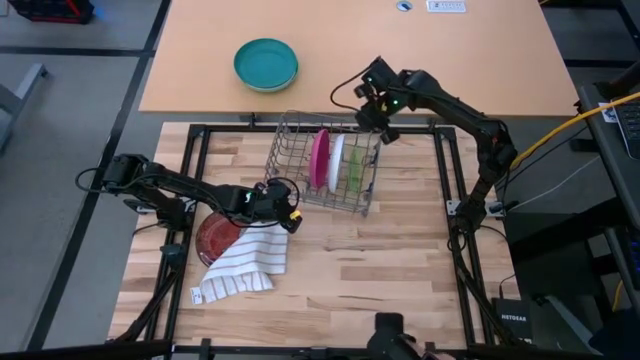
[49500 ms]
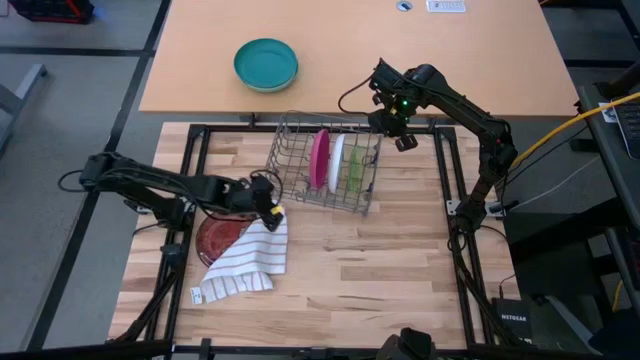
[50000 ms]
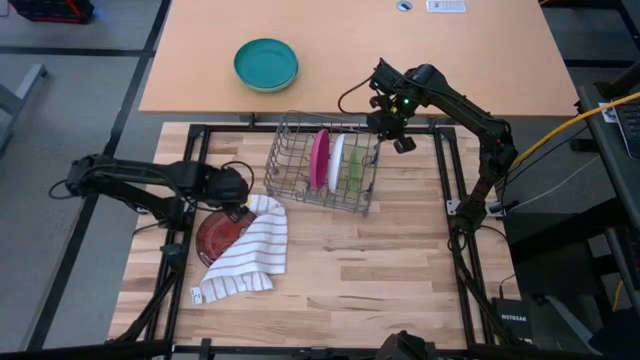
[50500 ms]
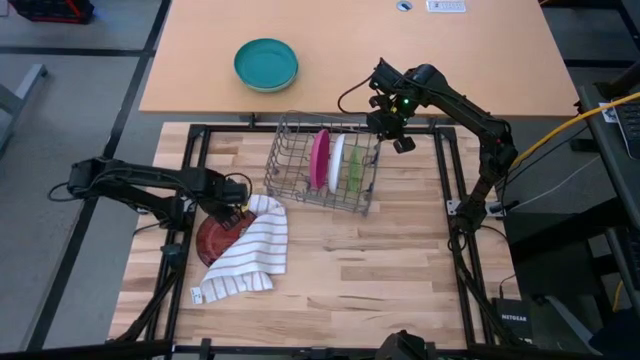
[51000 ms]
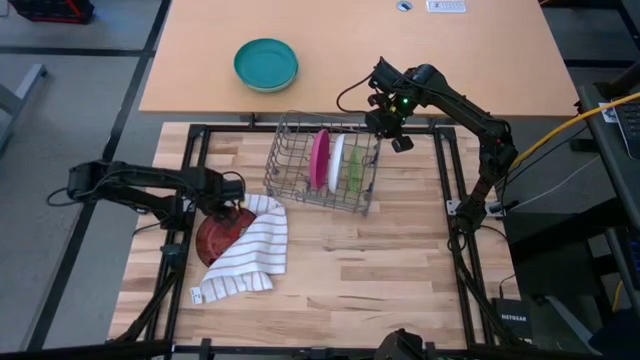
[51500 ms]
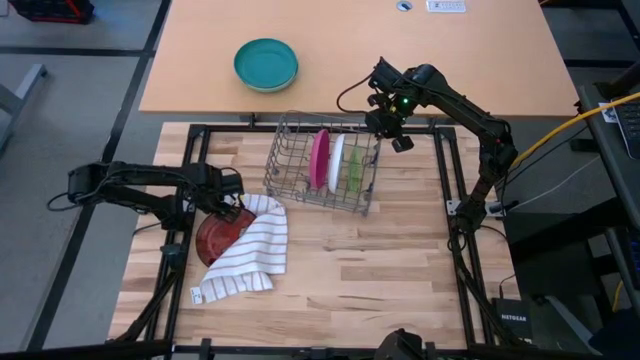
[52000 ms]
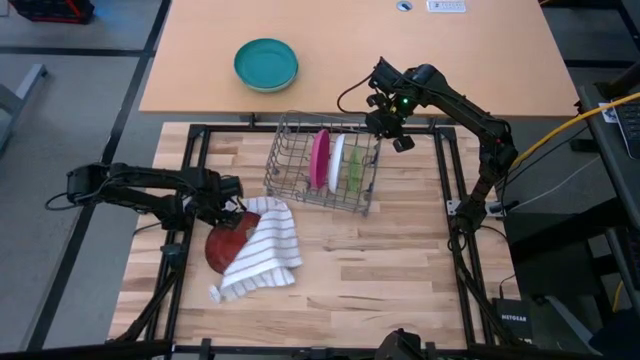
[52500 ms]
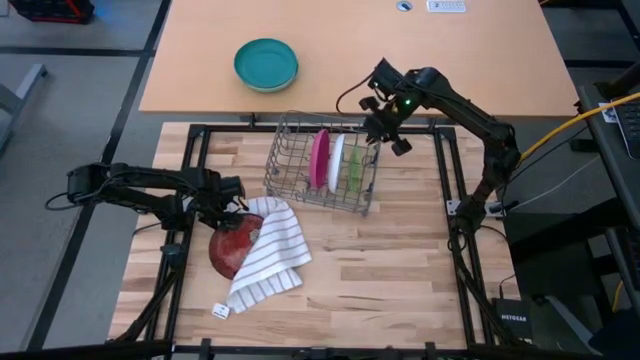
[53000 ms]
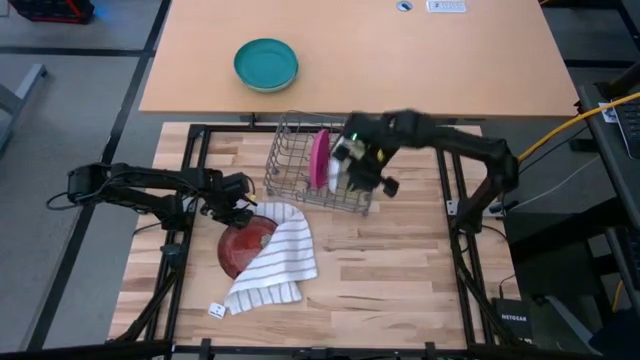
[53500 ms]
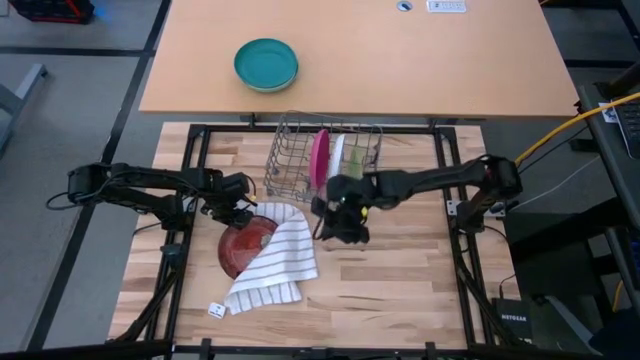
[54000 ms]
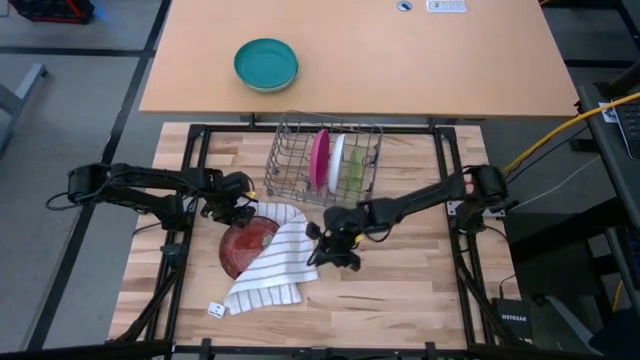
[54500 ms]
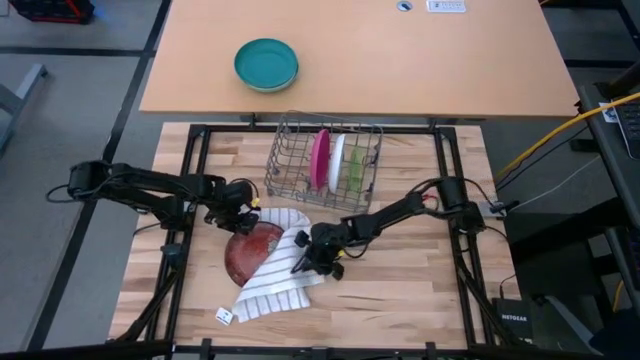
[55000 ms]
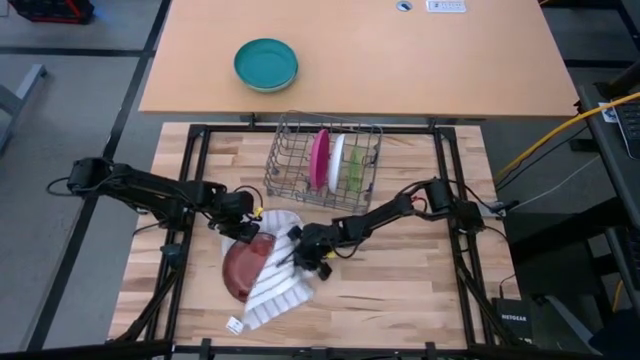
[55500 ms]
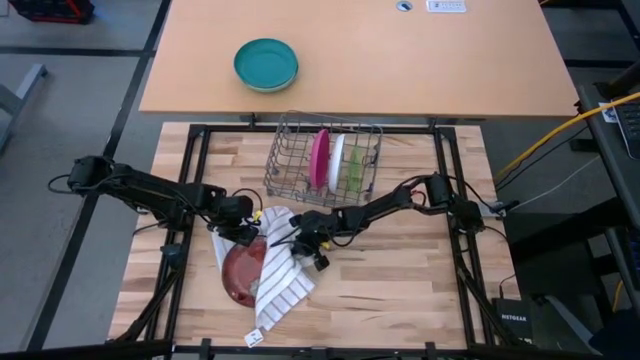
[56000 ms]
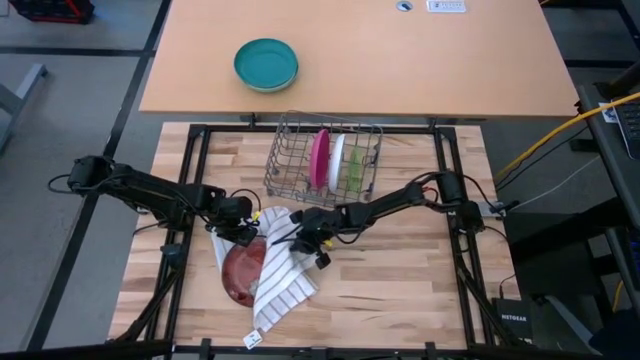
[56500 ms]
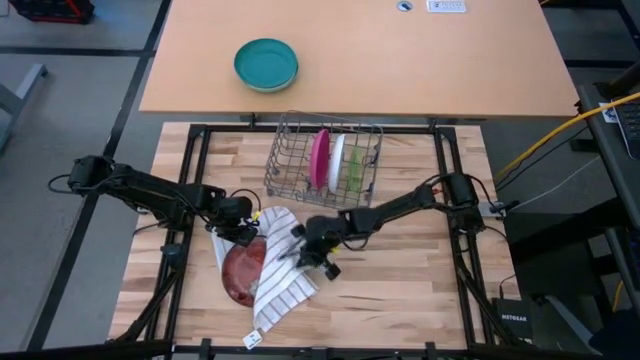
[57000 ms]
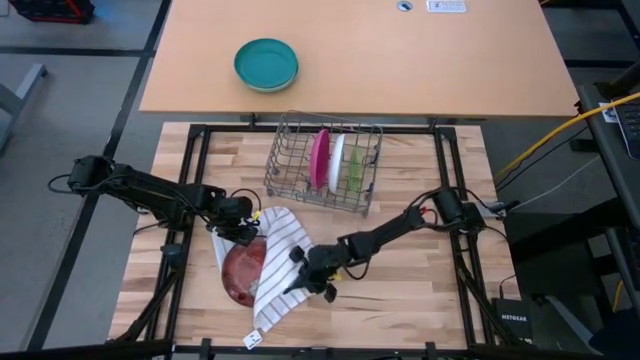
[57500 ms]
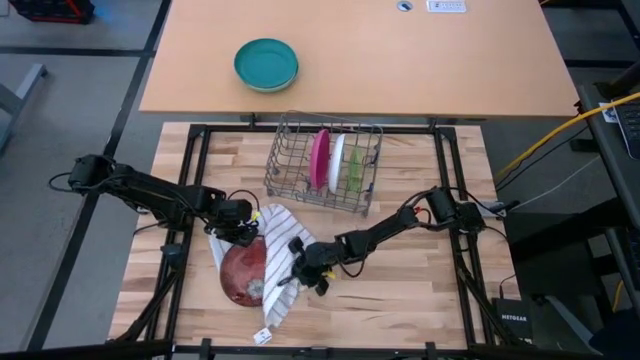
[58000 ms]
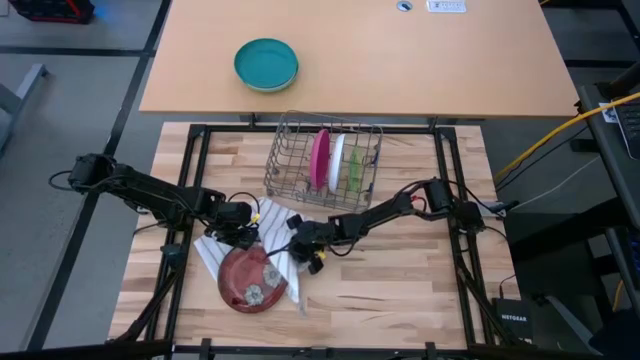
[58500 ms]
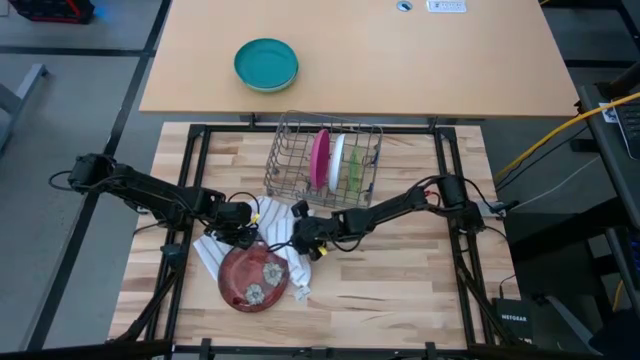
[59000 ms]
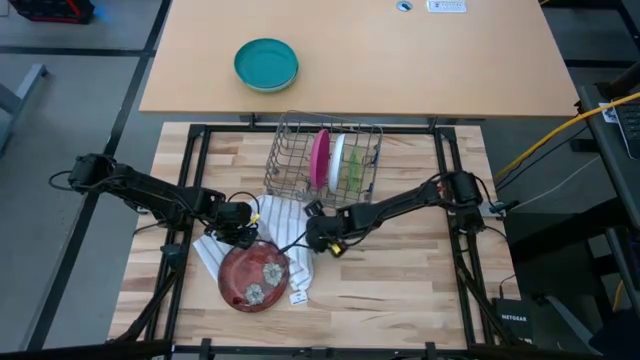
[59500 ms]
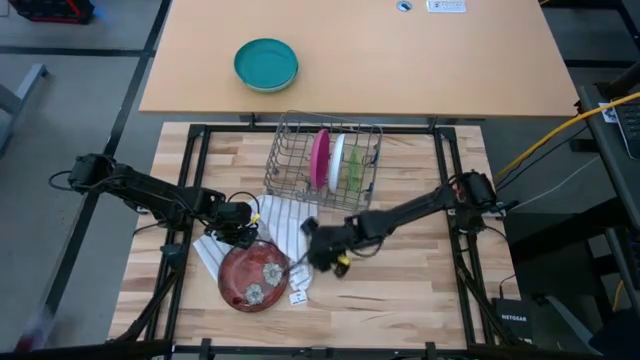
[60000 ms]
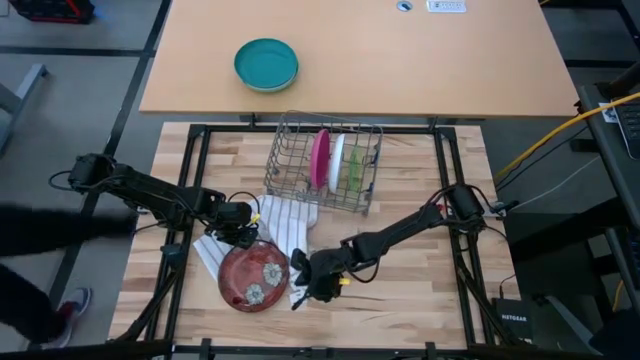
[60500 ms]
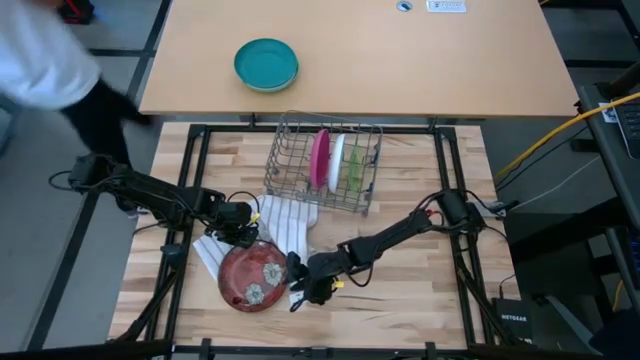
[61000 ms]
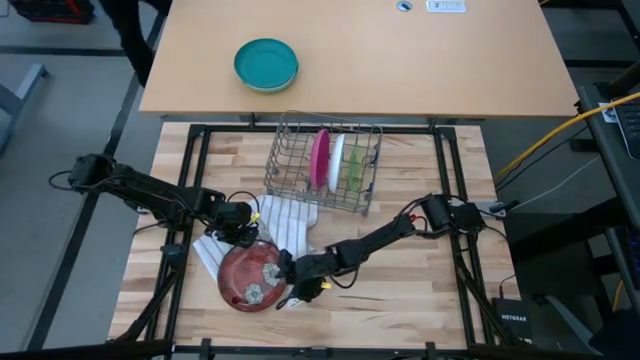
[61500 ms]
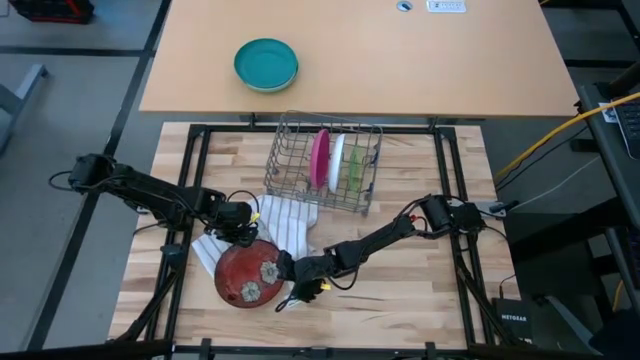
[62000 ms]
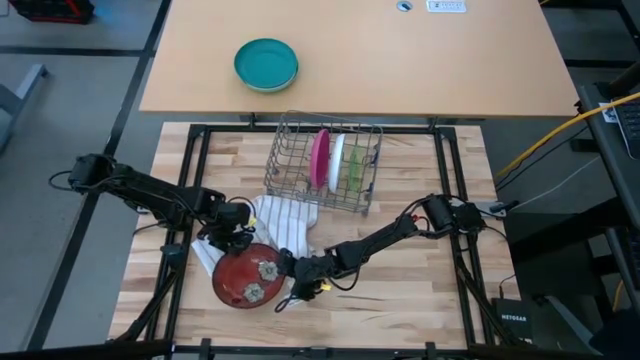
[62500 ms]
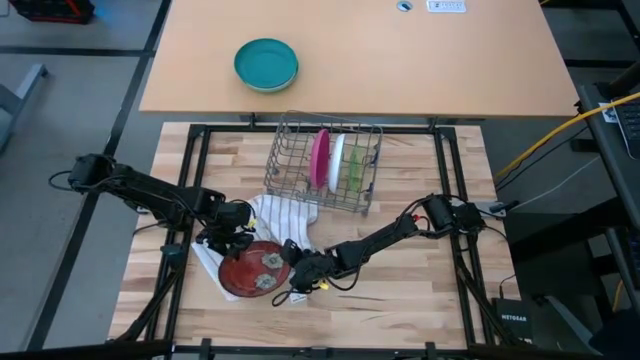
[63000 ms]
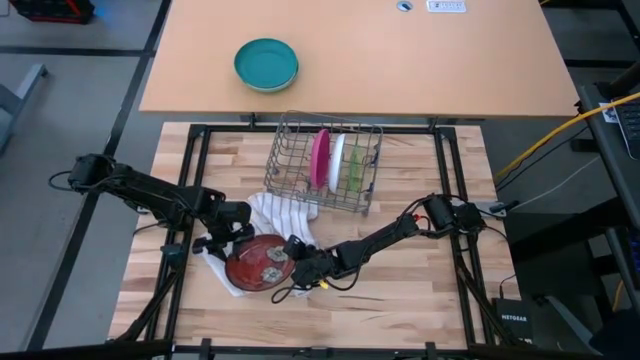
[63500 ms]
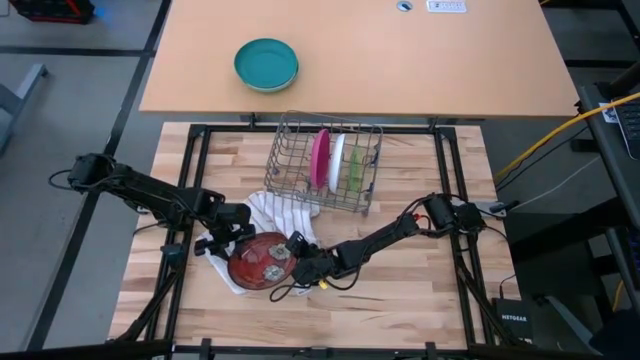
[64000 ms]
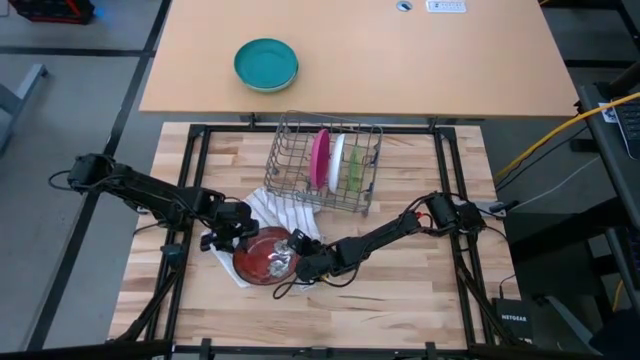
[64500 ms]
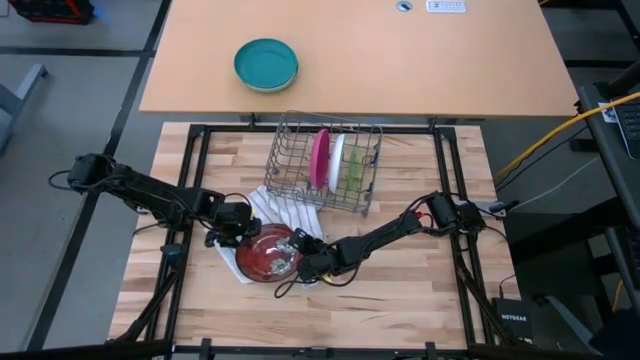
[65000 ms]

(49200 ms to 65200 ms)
Task: Sort dishes
Put the red plate in the dish rack

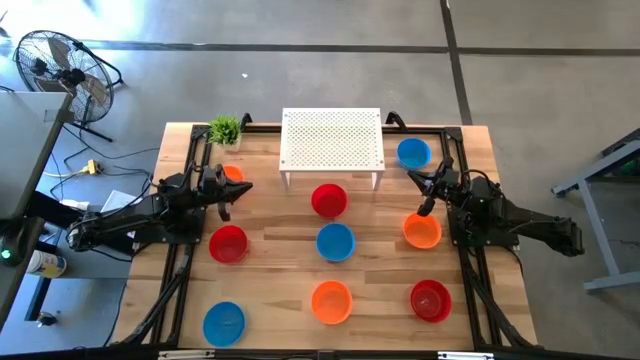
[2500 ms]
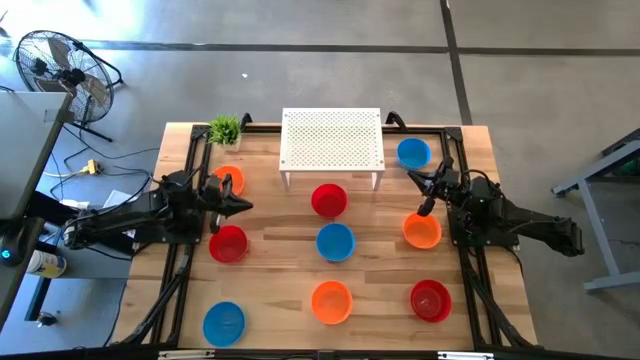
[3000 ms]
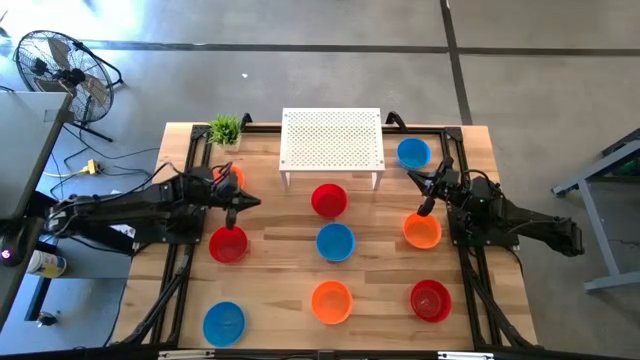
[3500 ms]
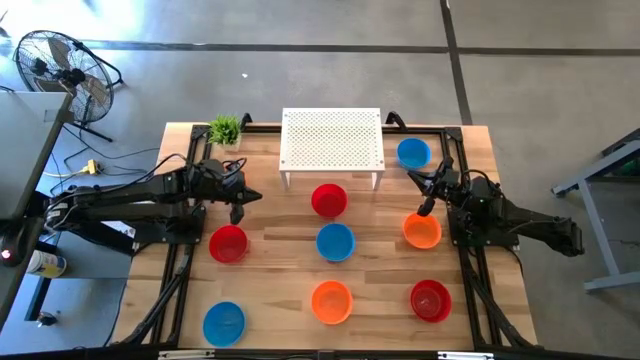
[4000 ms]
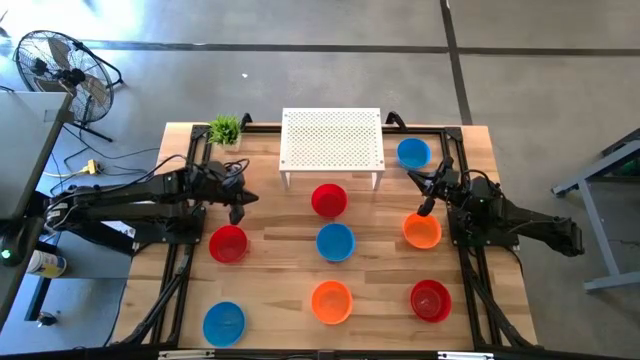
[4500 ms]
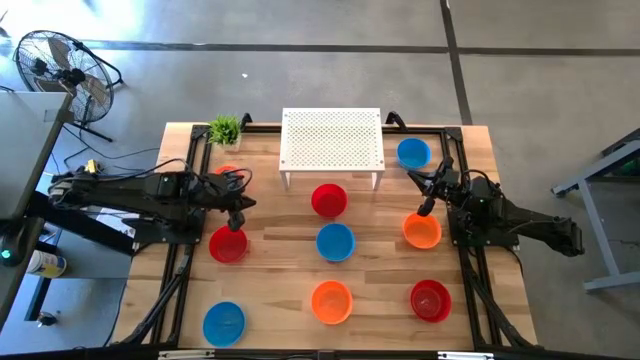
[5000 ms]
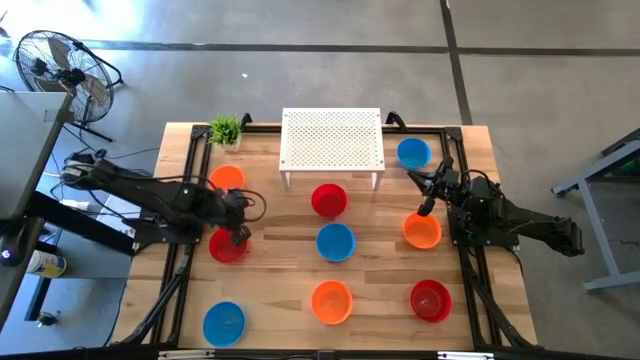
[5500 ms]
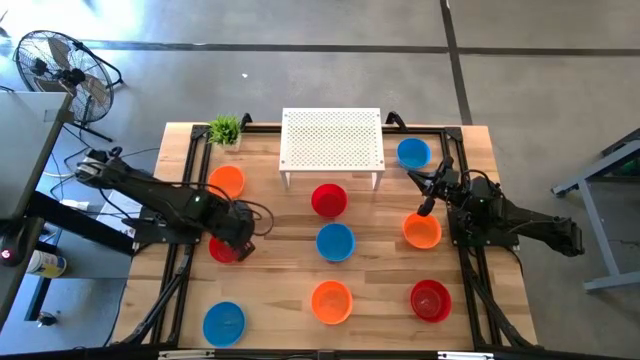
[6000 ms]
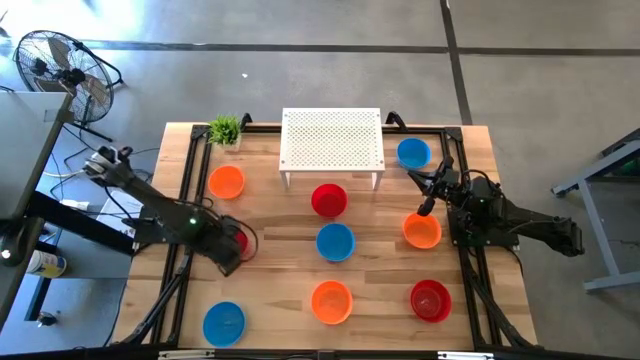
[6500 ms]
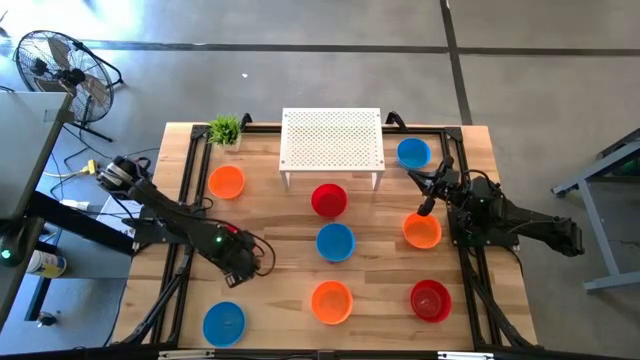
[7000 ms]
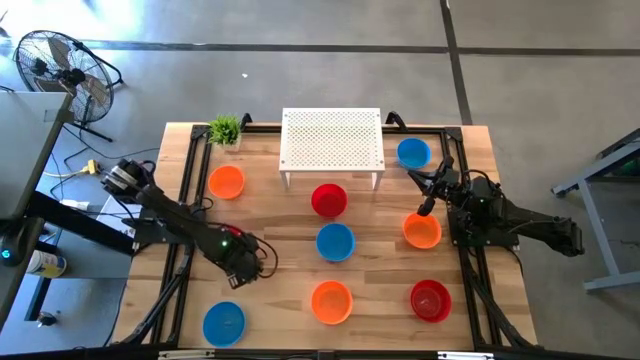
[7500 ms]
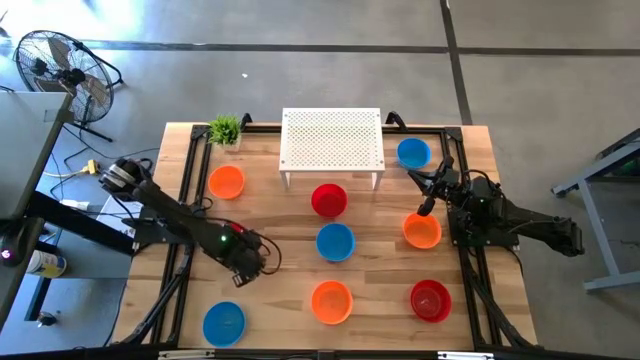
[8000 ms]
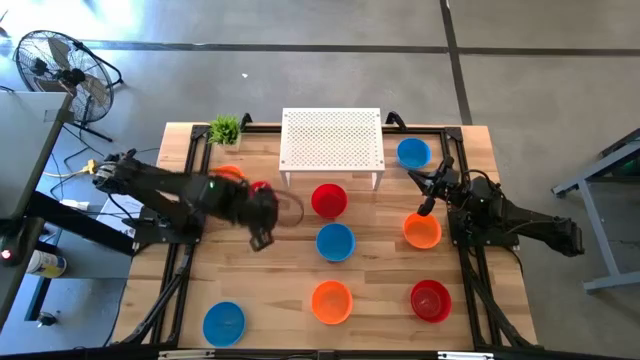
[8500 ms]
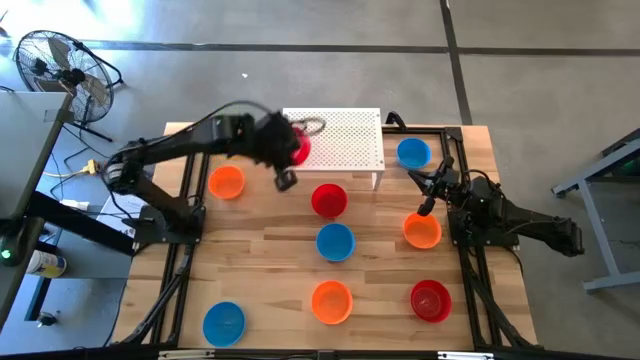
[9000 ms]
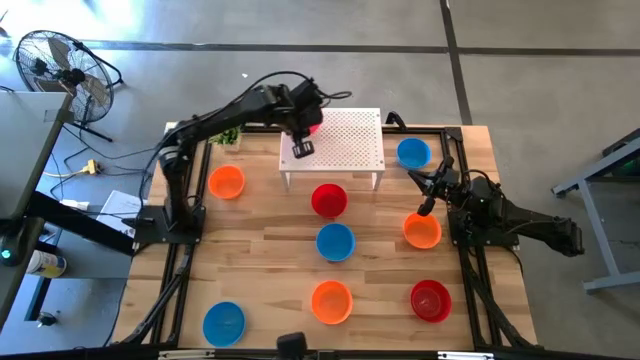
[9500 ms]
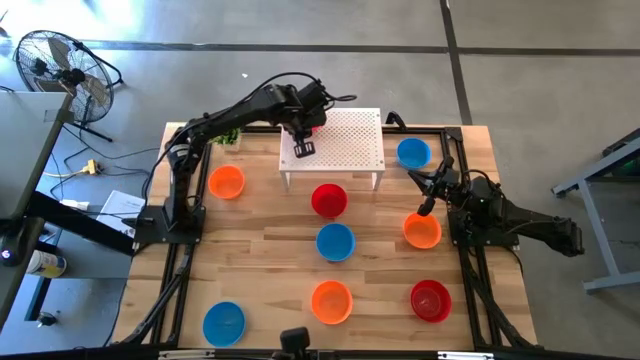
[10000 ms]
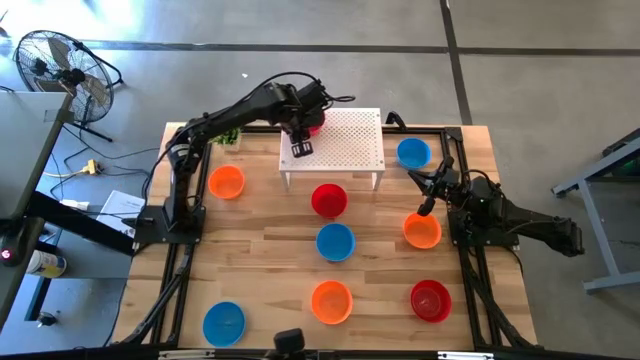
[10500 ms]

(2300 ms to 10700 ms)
Task: Pick & Place Mini bowls
Put the middle red bowl on the shelf
